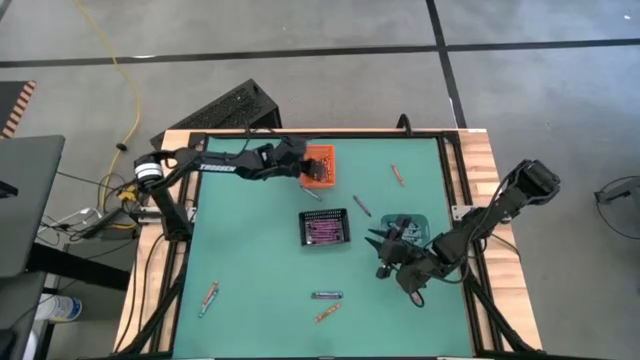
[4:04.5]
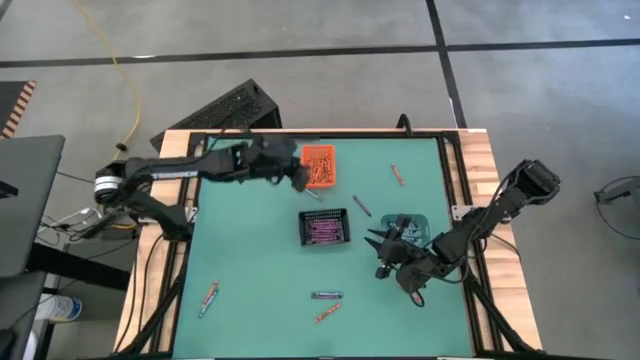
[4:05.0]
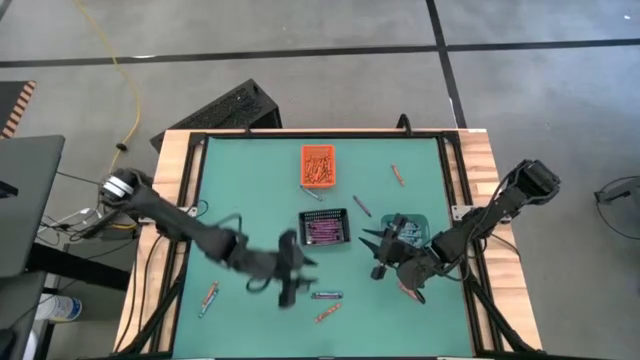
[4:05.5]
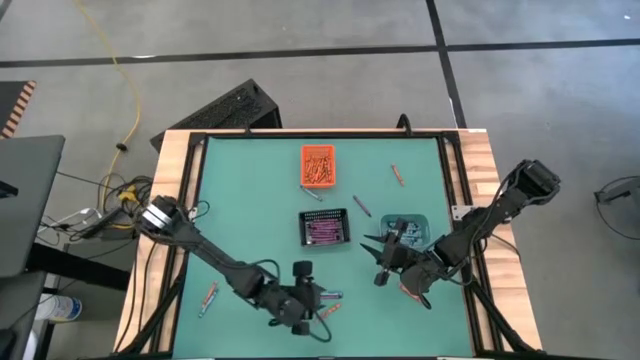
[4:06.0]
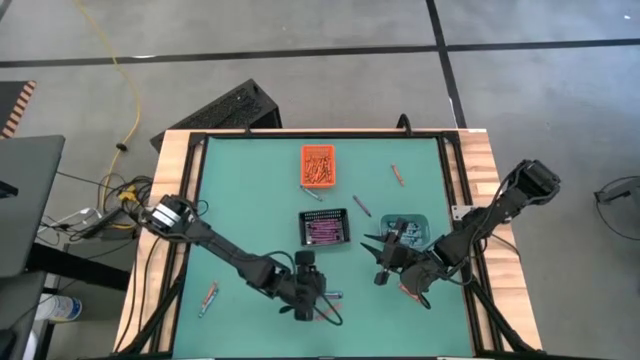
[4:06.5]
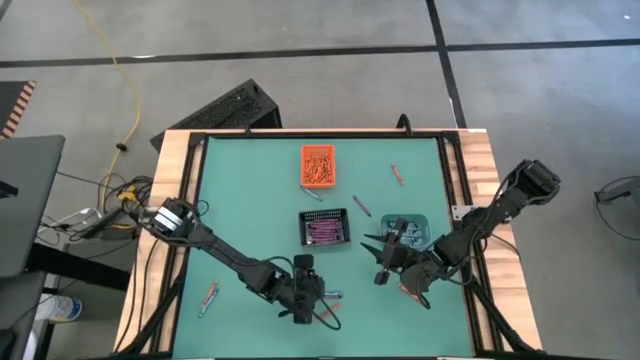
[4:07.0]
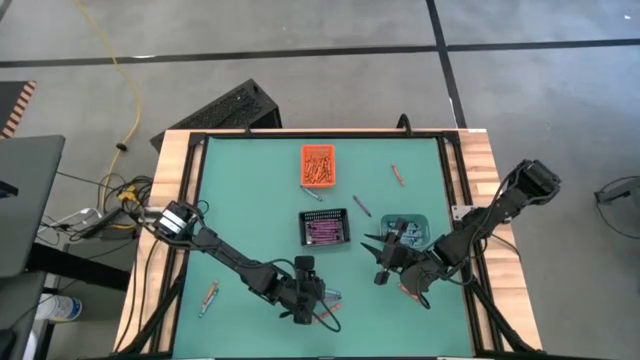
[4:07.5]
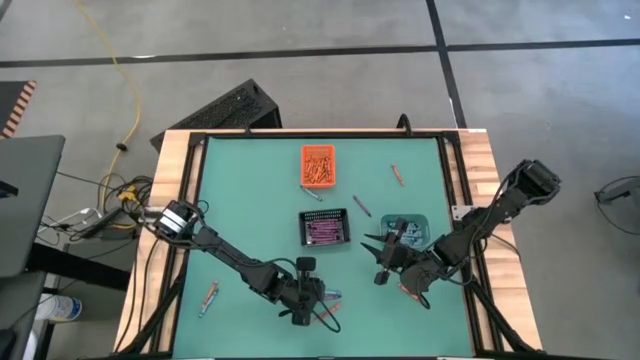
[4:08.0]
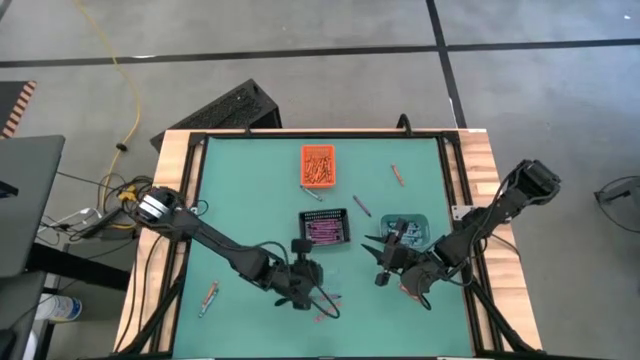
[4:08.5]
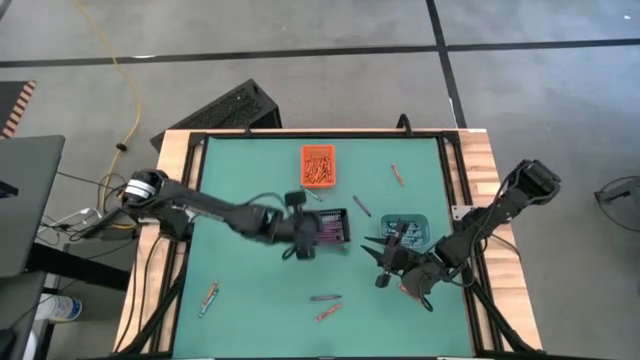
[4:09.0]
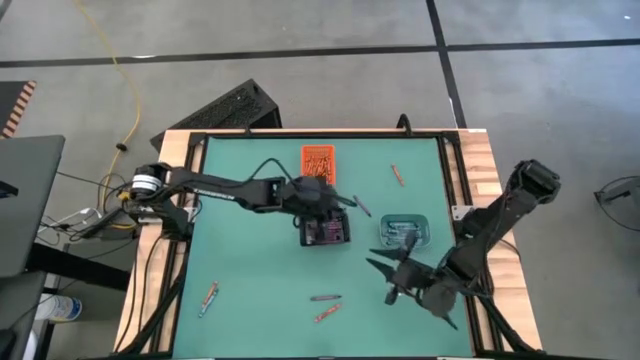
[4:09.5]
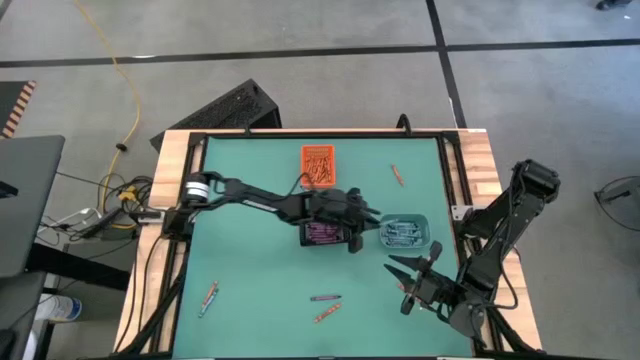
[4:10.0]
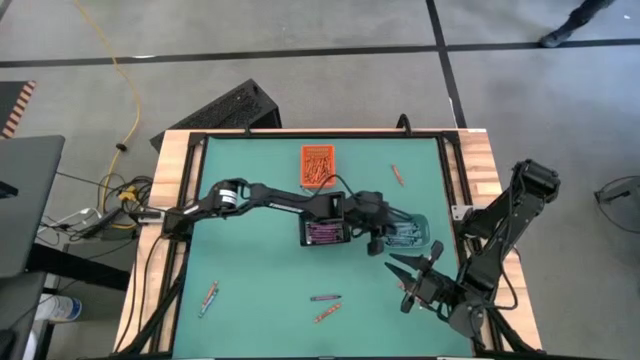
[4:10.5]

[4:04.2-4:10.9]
Task: Sort crayons
Put the blue crayon into the green bin

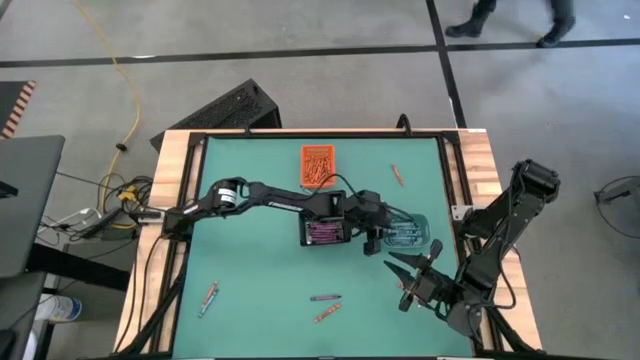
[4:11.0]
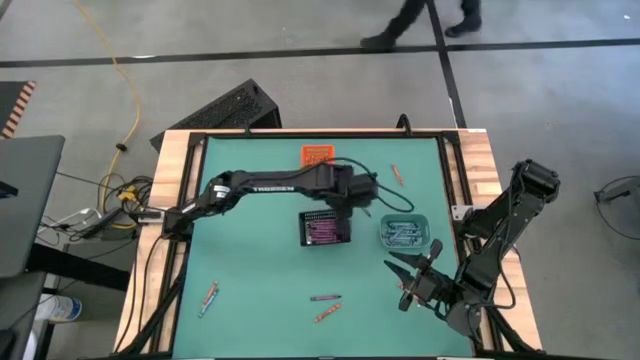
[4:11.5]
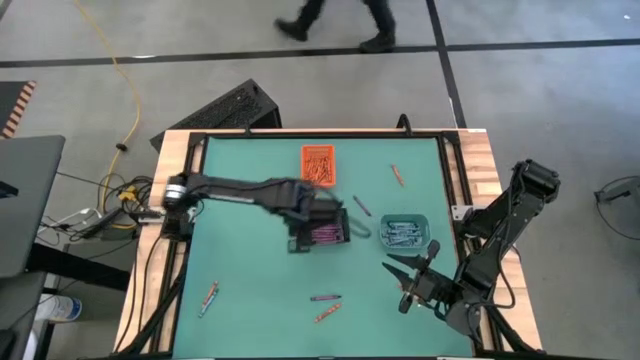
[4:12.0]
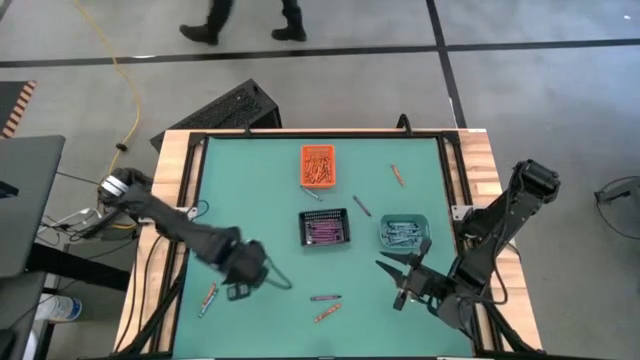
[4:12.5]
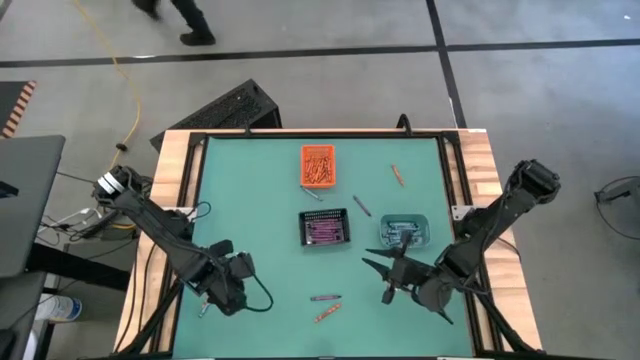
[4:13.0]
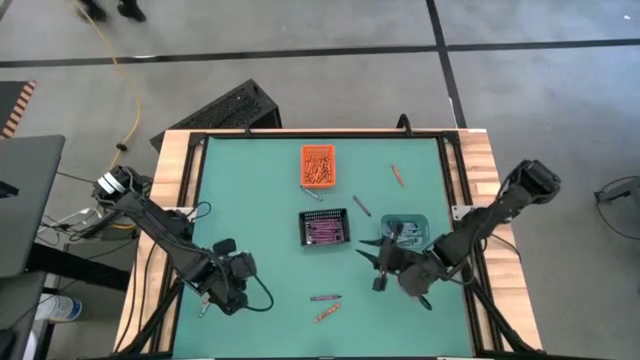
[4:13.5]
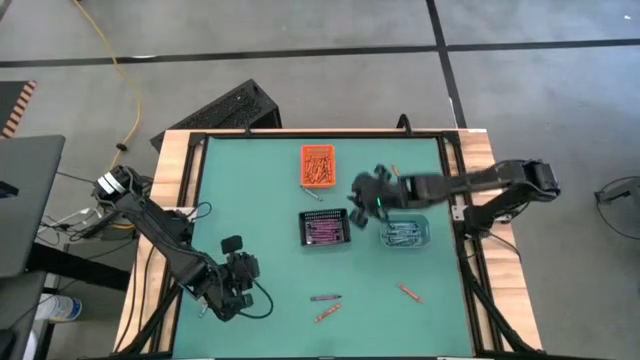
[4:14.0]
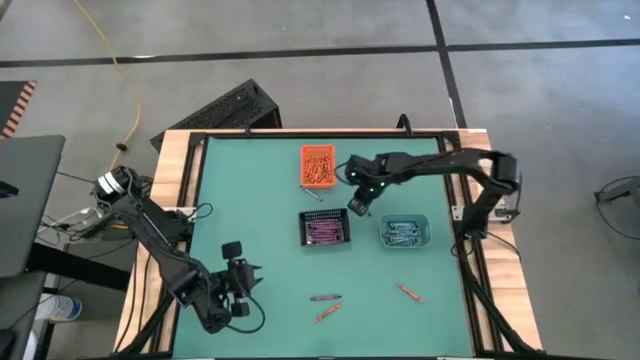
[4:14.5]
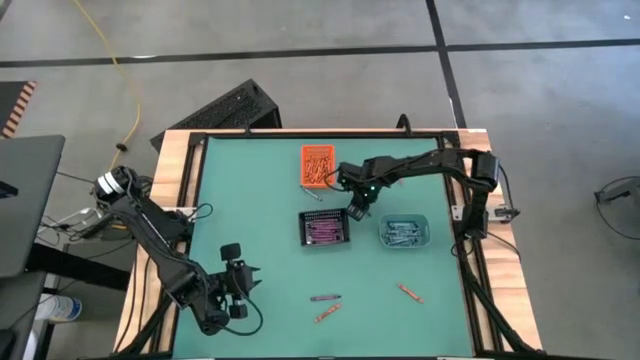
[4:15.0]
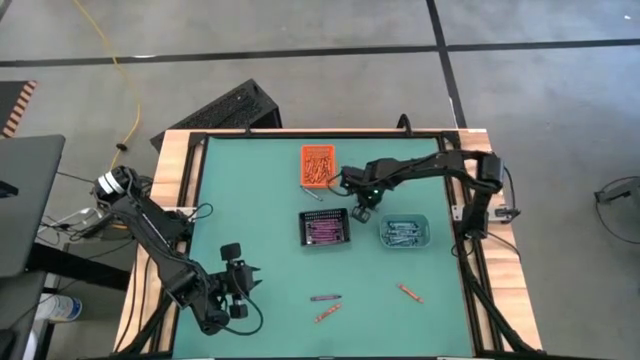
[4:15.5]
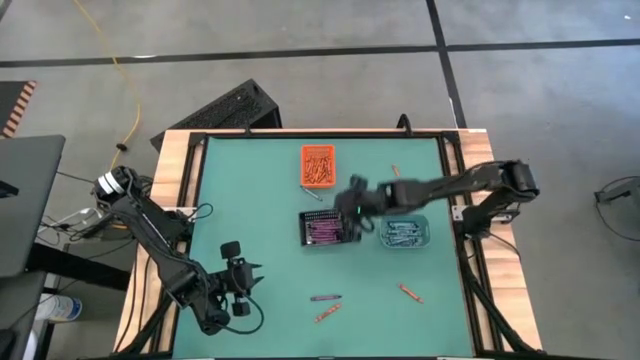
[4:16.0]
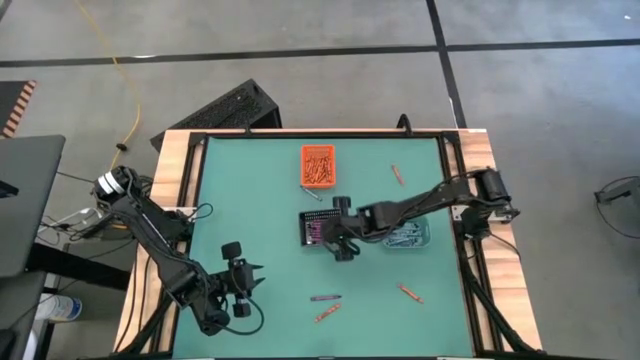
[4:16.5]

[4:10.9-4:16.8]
Put the violet crayon into the black bin

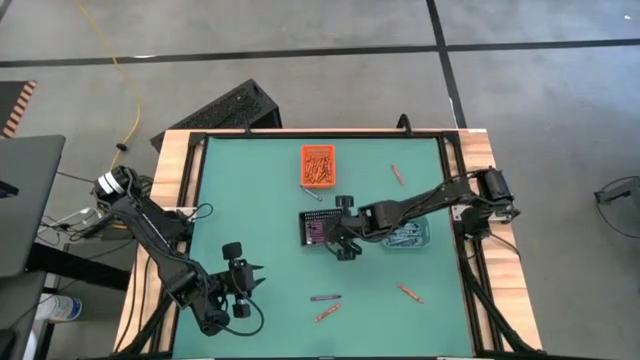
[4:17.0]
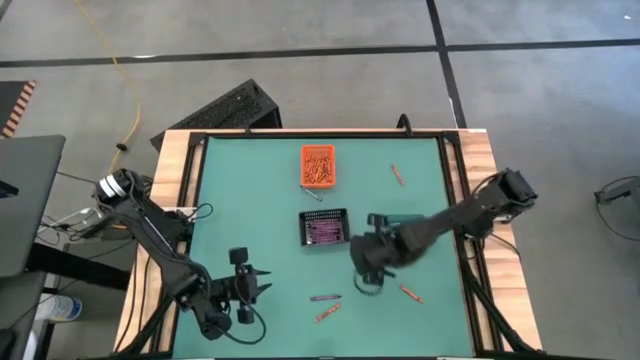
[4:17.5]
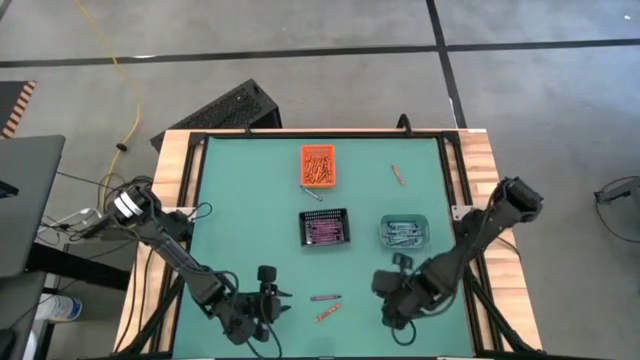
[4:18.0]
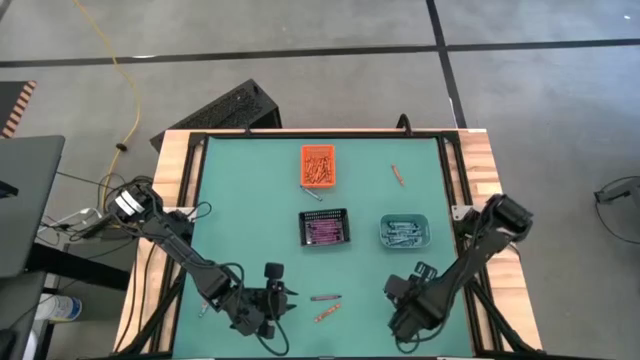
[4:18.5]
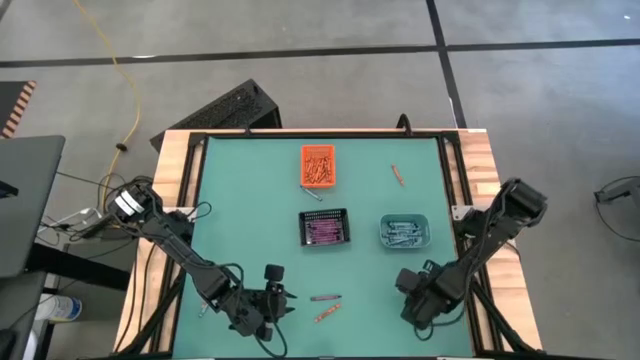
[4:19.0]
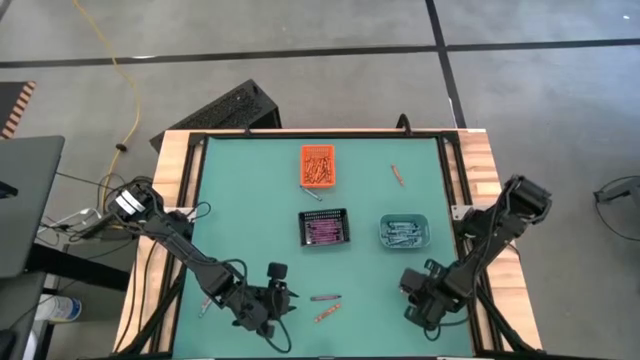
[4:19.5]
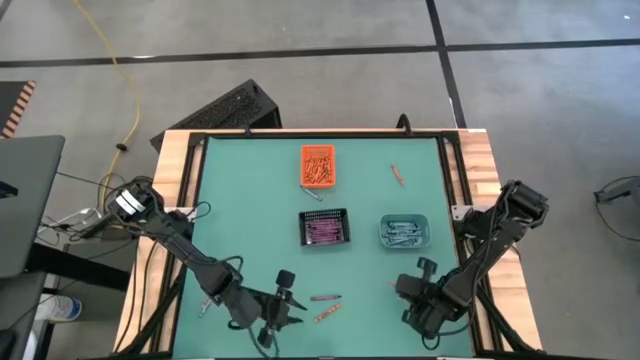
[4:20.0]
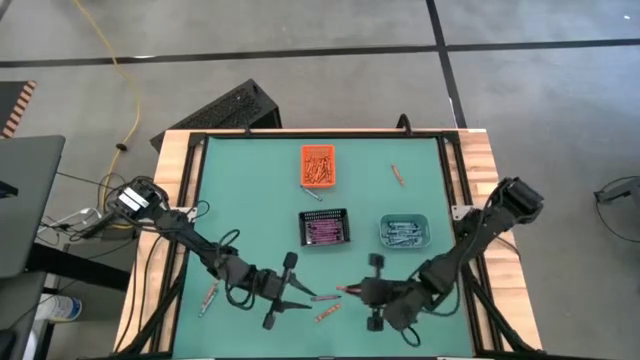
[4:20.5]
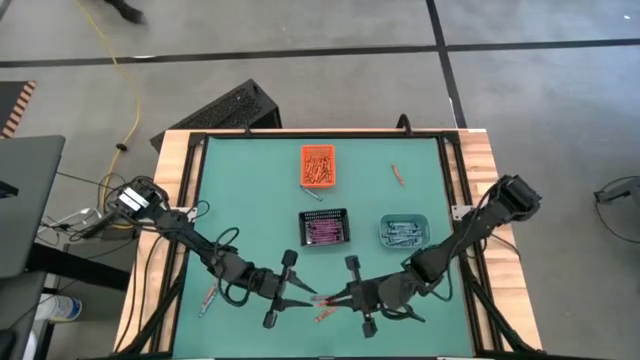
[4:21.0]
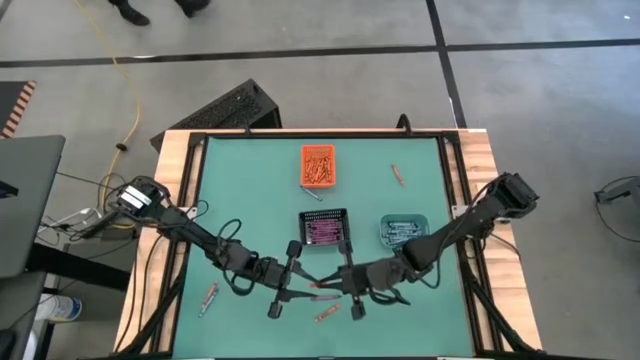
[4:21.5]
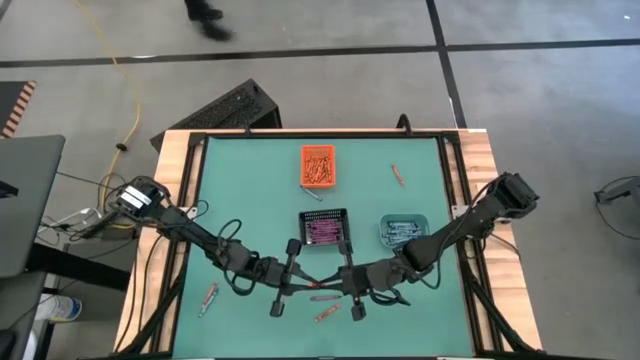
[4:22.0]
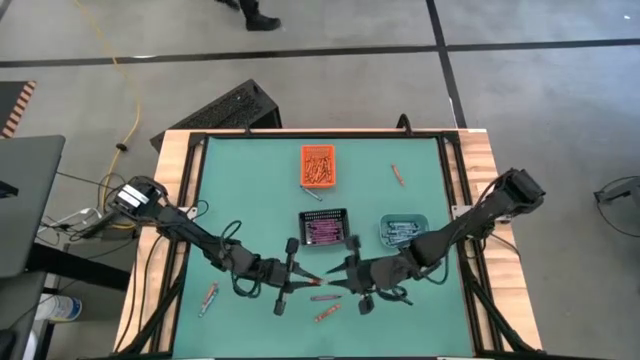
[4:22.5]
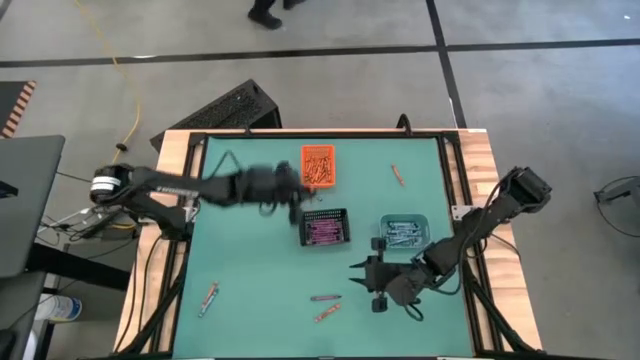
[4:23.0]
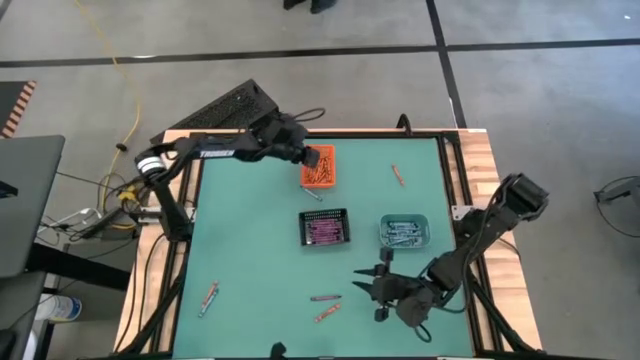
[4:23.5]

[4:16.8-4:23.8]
Put the orange crayon into the orange bin

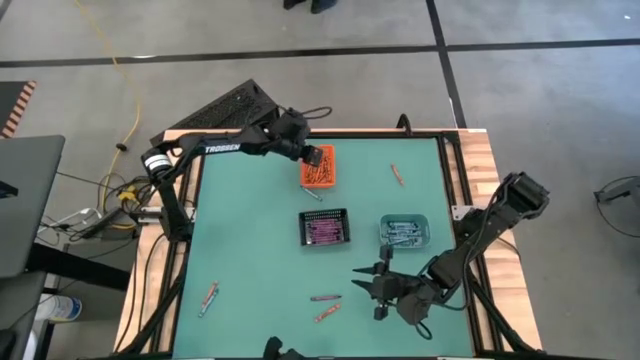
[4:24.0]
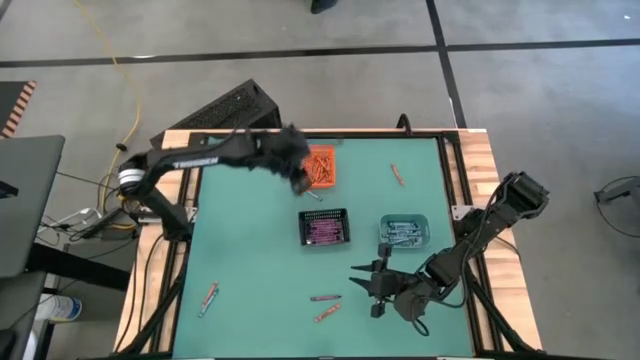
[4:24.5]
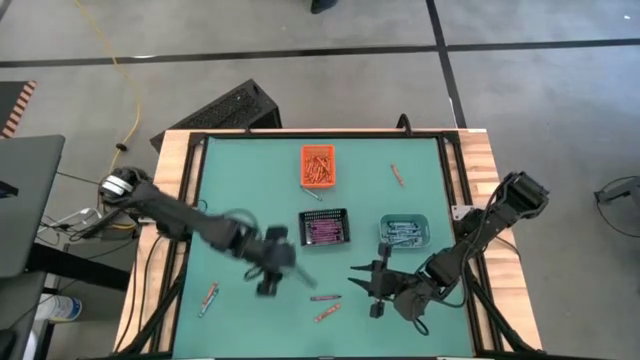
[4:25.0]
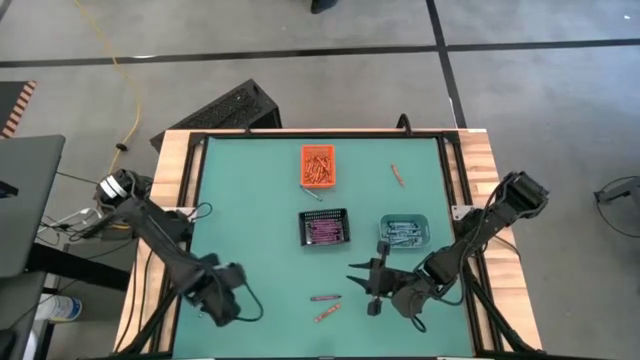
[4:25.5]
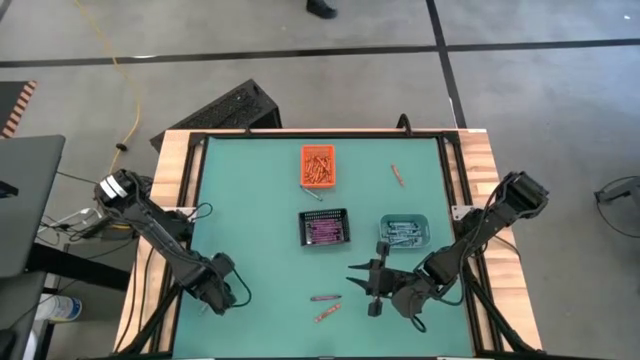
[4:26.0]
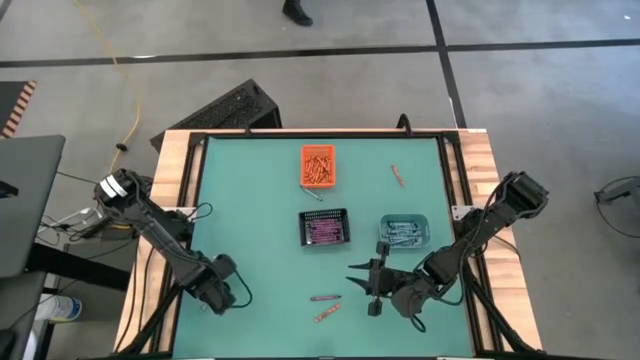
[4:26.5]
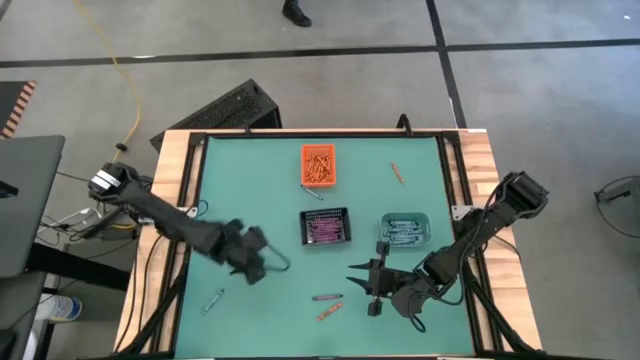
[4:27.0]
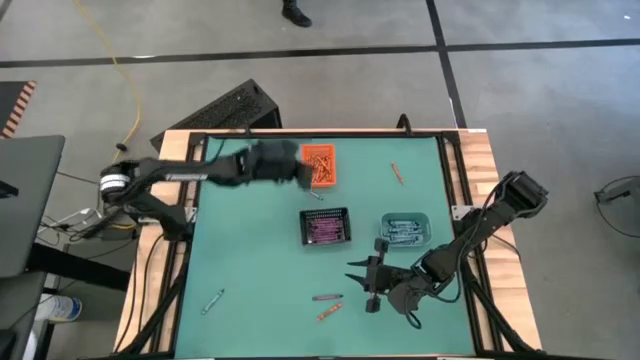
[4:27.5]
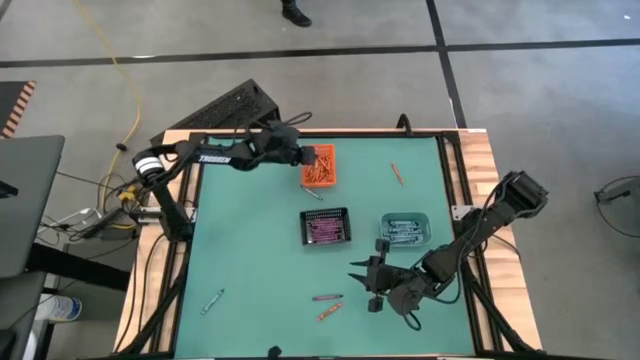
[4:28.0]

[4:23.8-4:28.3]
Put the orange crayon into the orange bin
